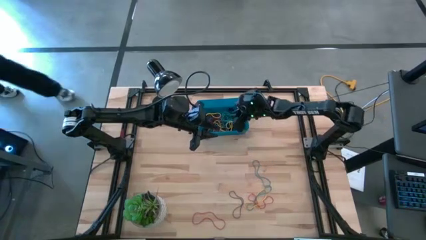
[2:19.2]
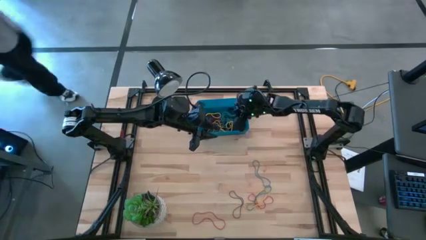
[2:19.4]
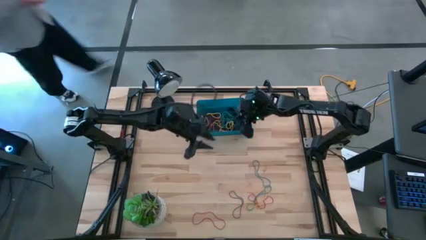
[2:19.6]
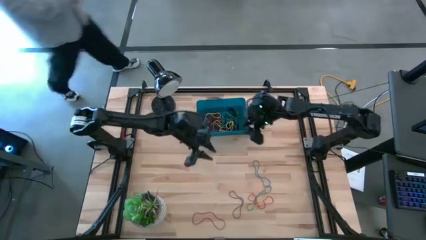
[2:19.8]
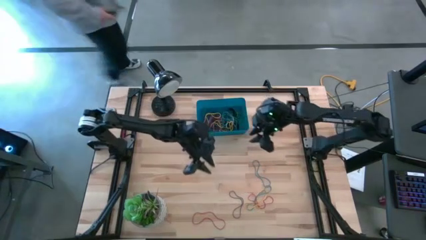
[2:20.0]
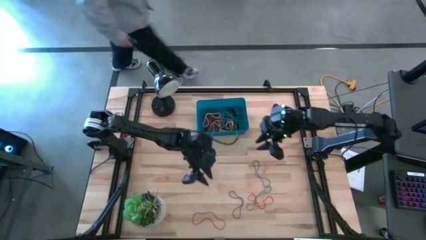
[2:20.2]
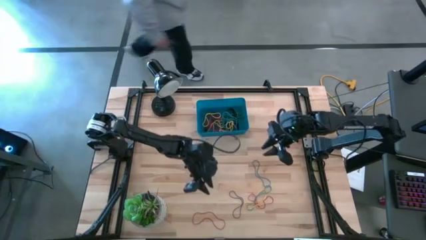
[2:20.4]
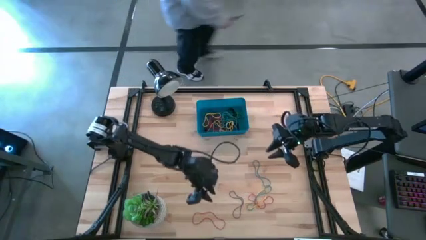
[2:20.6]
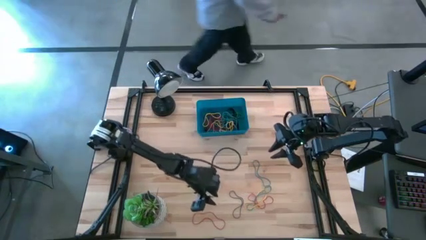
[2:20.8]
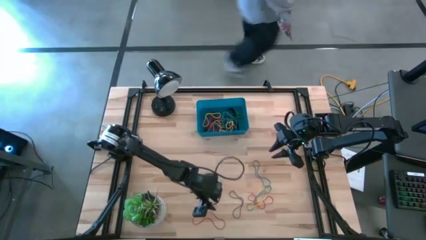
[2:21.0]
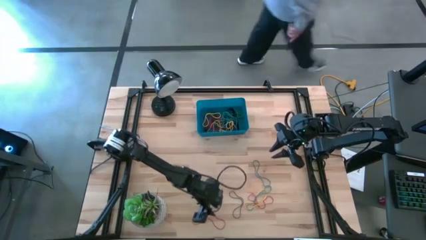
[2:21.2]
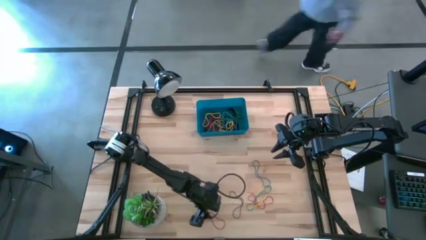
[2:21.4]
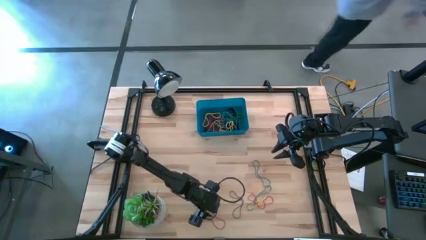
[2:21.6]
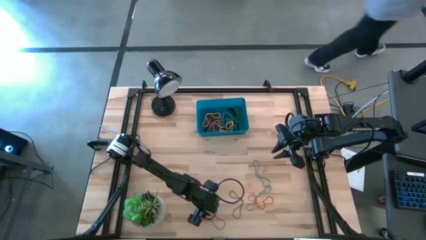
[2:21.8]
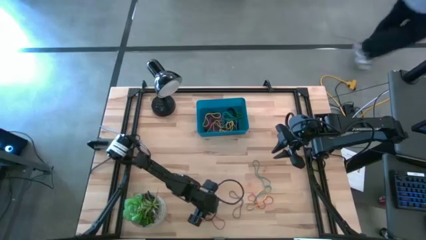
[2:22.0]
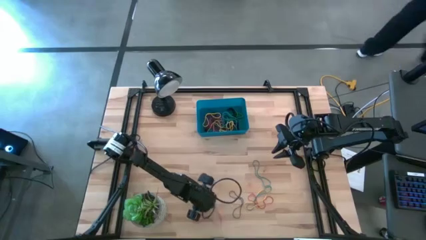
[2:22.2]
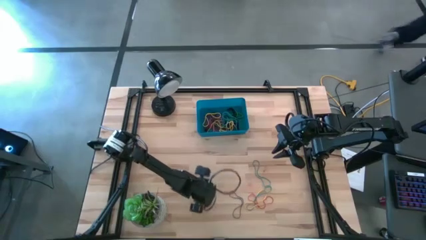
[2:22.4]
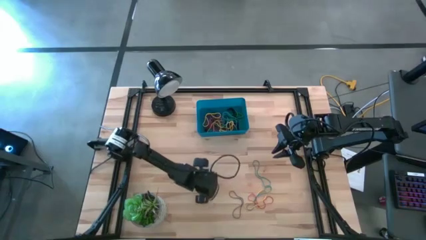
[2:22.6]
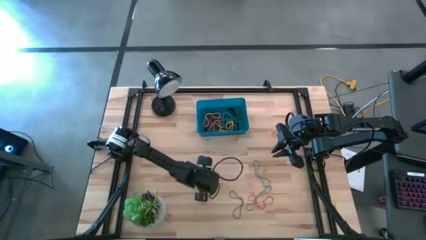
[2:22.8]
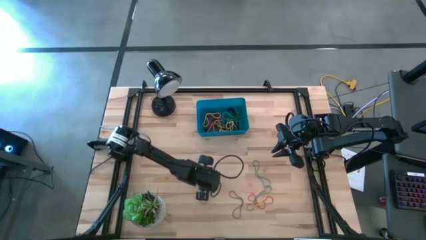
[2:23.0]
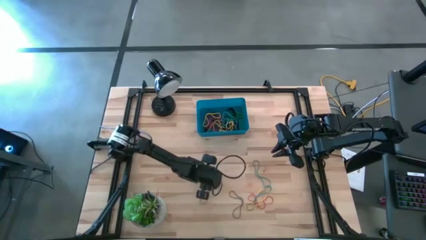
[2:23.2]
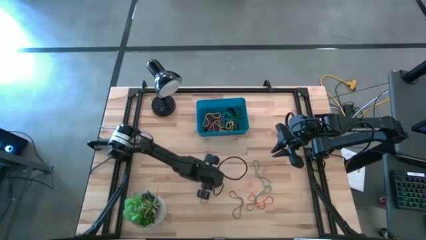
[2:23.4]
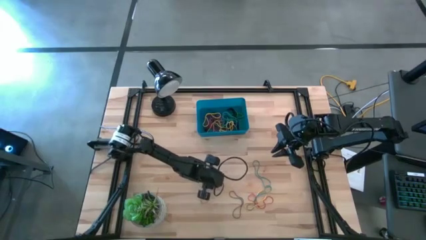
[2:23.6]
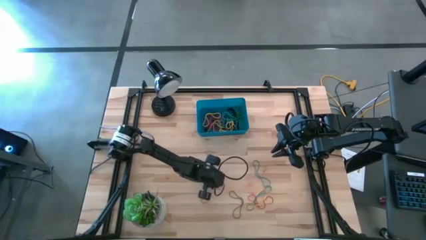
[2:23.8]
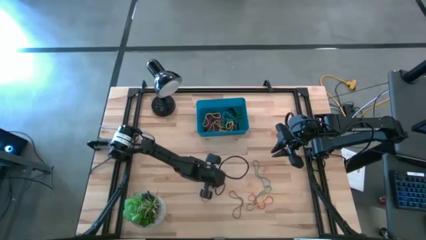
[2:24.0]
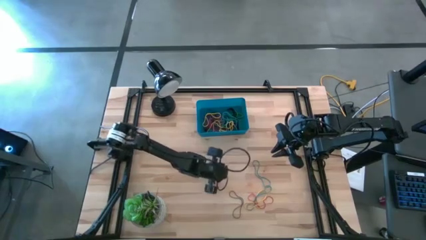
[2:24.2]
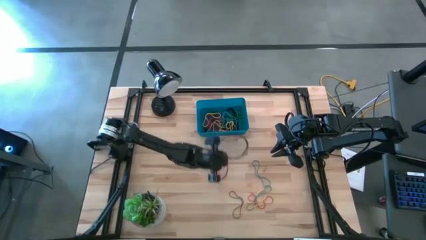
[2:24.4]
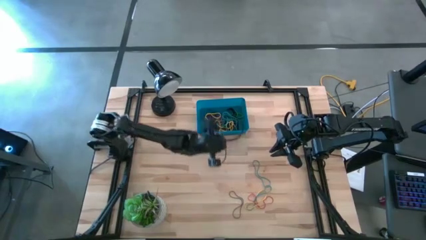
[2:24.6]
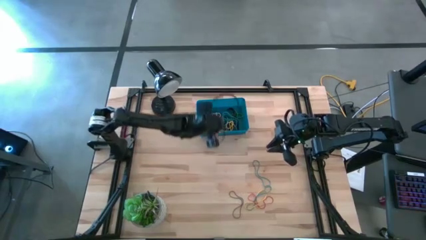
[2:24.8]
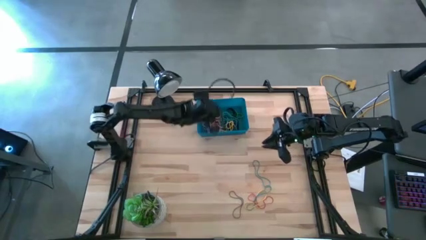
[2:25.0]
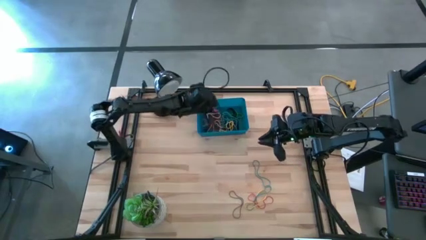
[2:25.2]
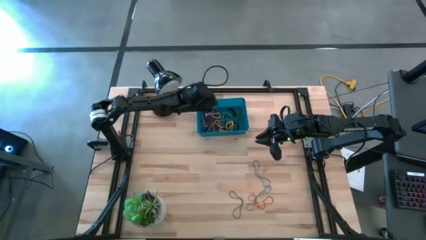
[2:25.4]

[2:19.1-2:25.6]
Task: Pick and place rubber bands into bin
Put the red rubber band into the blue bin

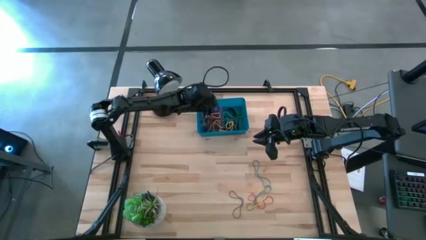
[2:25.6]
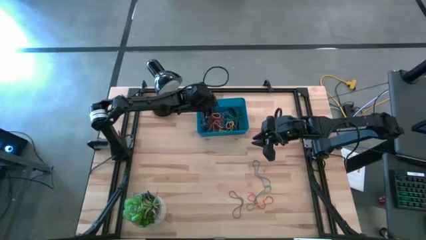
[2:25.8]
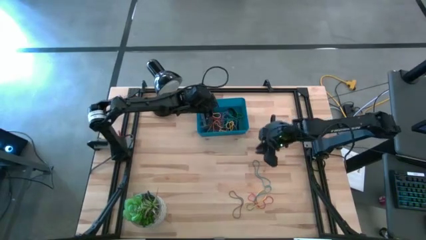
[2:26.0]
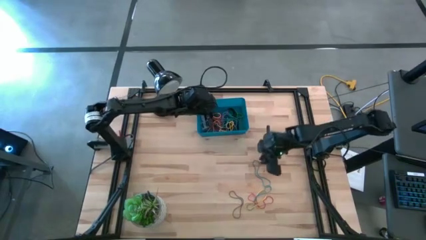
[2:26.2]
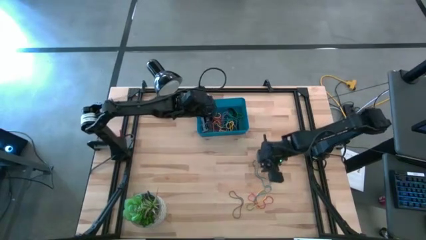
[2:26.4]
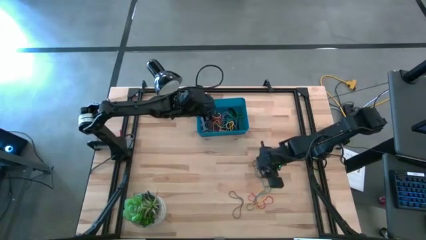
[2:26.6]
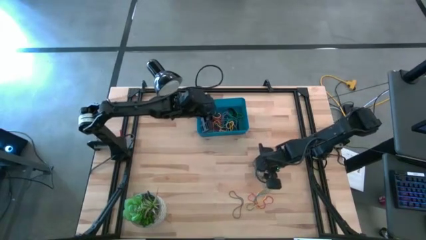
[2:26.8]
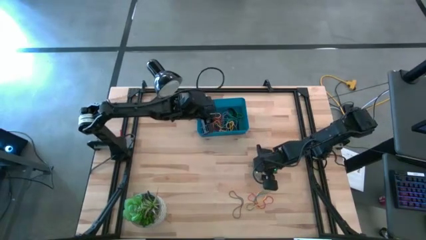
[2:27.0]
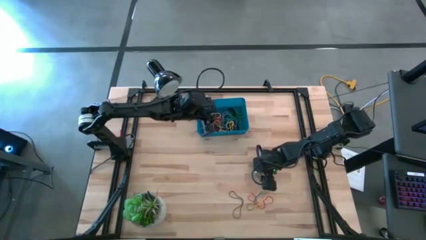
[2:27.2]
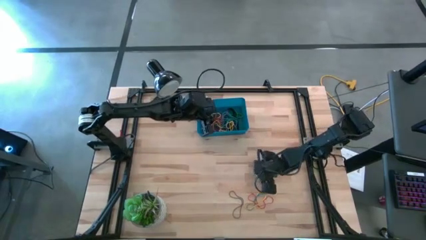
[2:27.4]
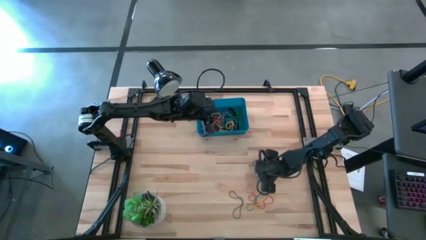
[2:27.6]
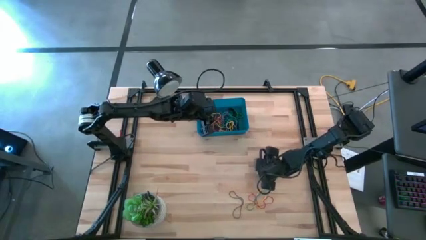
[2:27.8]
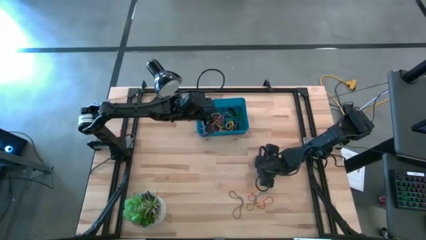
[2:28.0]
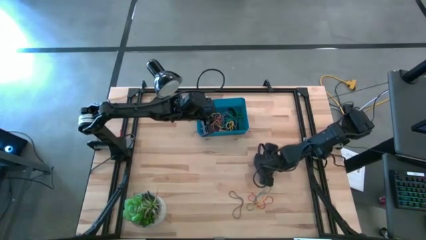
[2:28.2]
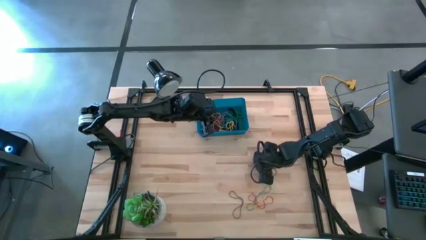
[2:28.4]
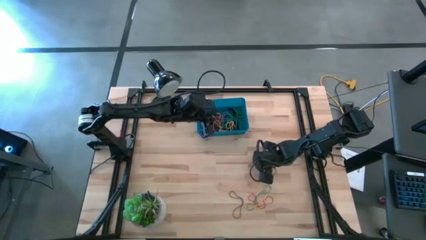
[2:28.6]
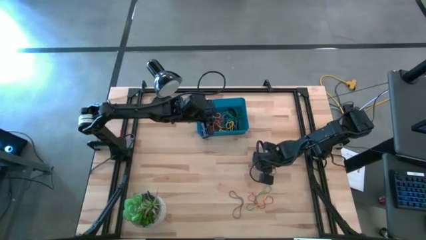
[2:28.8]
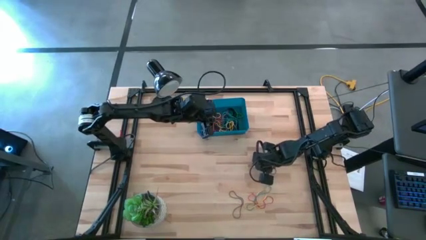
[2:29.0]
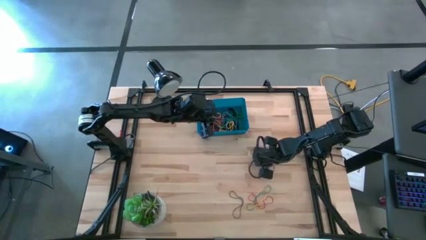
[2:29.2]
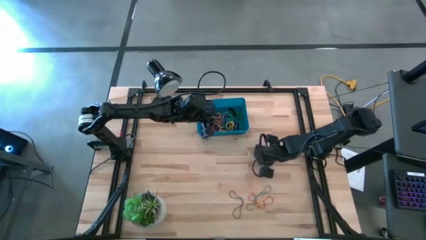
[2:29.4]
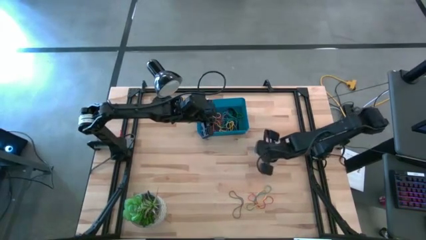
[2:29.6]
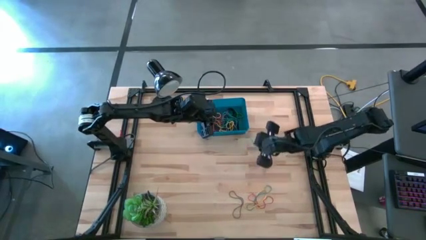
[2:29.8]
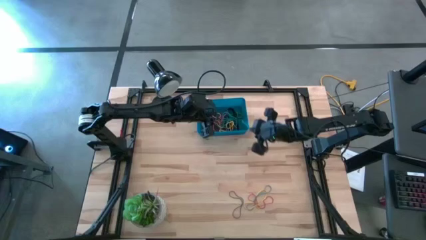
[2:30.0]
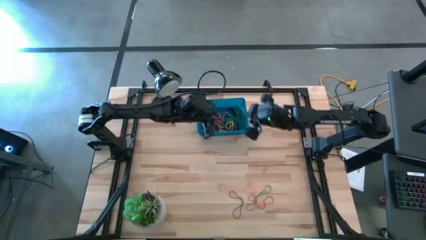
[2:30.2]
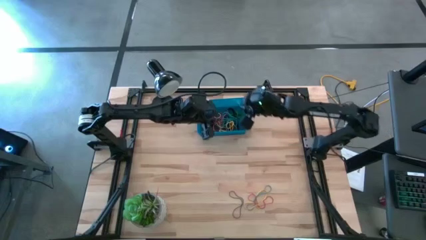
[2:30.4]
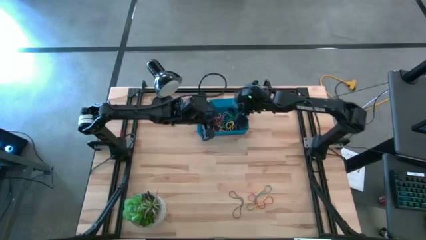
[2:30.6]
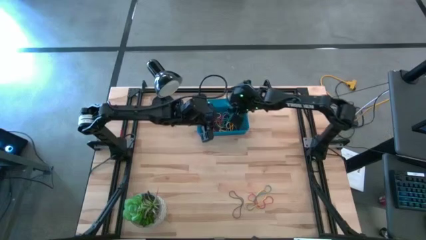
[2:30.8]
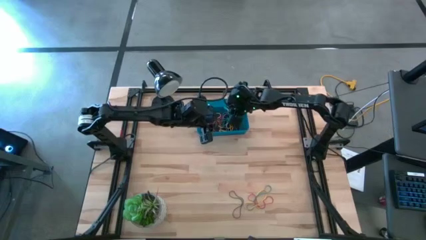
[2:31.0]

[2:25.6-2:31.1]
Put the blue rubber band into the blue bin

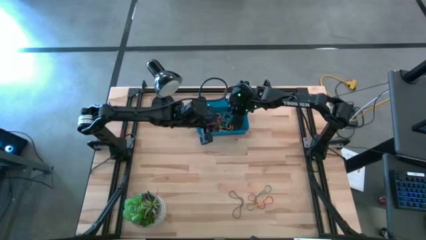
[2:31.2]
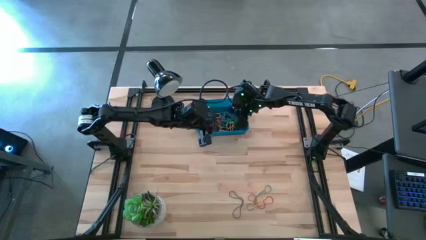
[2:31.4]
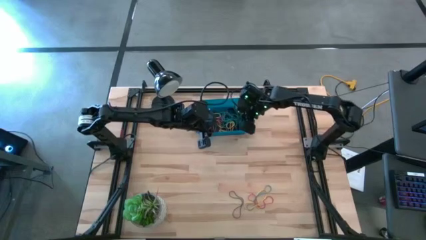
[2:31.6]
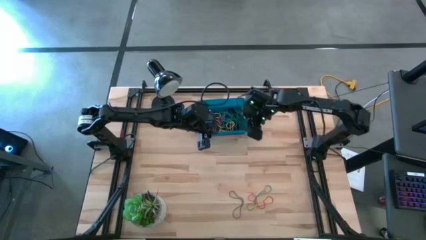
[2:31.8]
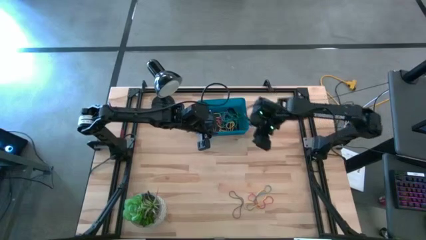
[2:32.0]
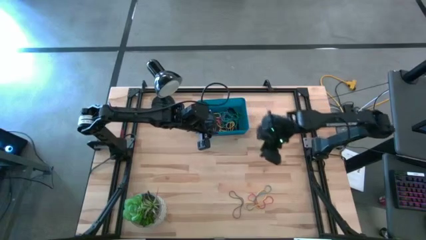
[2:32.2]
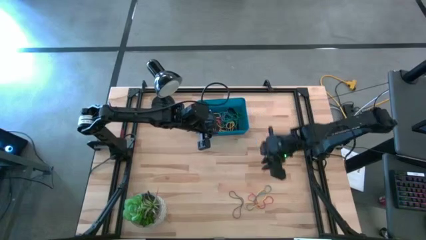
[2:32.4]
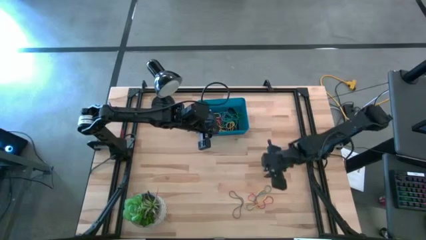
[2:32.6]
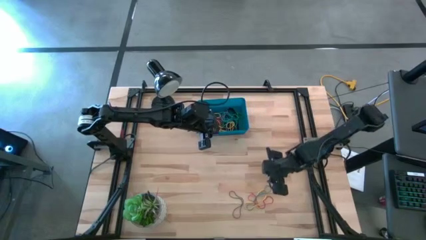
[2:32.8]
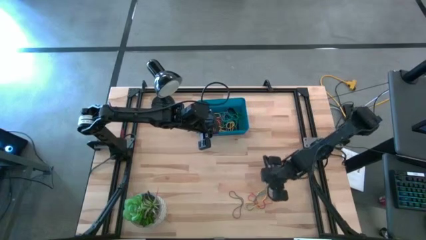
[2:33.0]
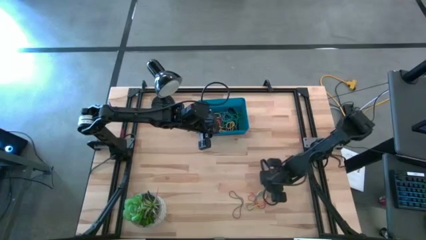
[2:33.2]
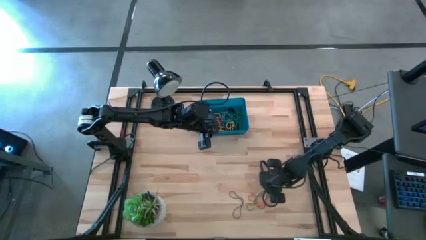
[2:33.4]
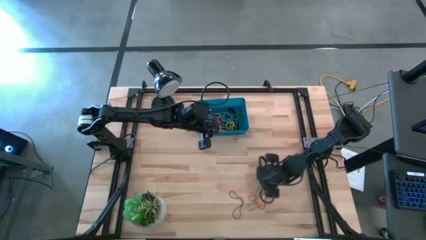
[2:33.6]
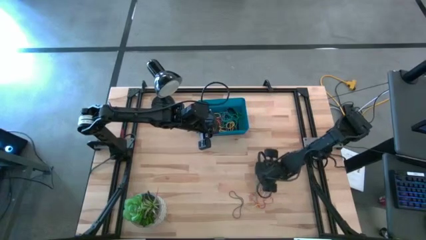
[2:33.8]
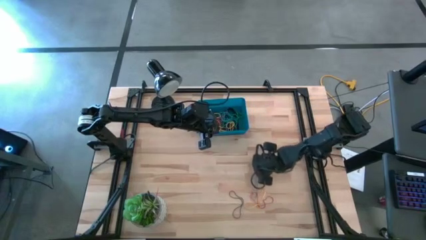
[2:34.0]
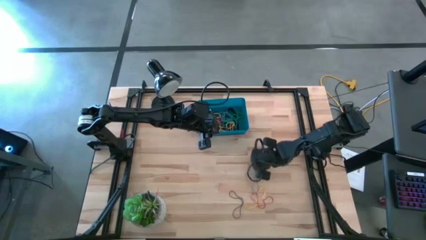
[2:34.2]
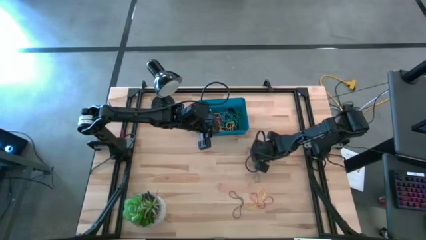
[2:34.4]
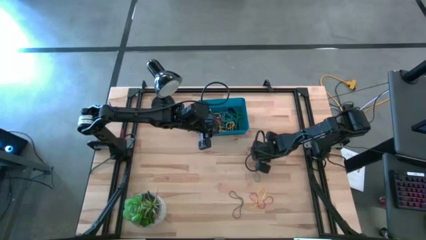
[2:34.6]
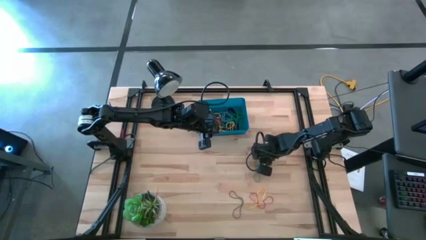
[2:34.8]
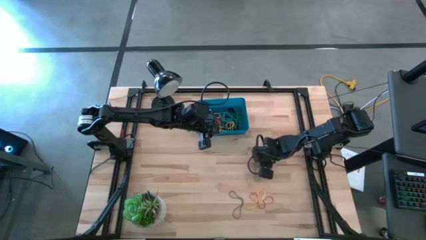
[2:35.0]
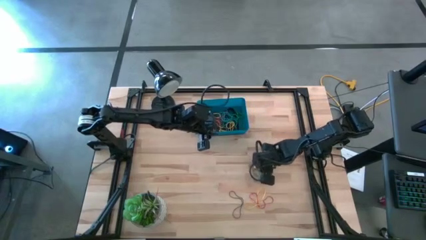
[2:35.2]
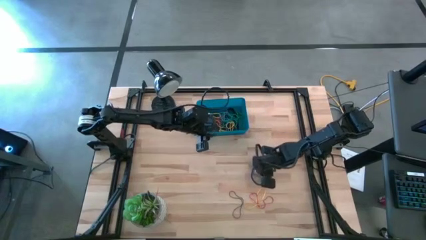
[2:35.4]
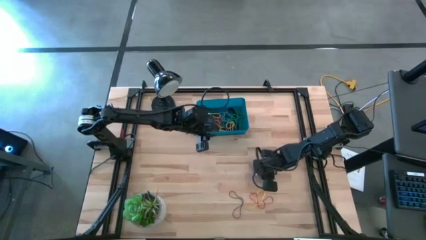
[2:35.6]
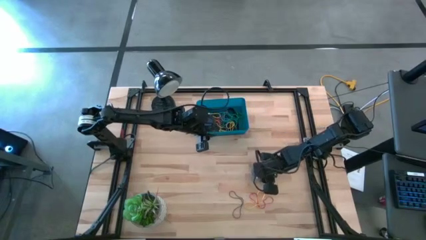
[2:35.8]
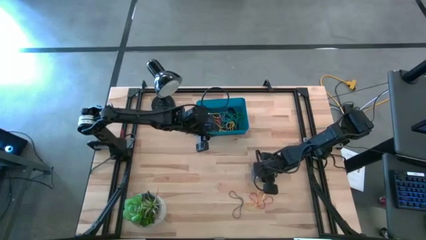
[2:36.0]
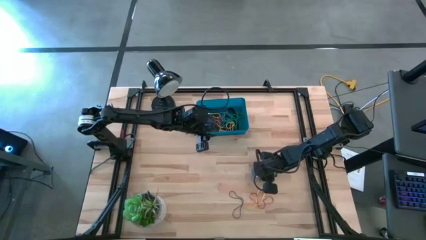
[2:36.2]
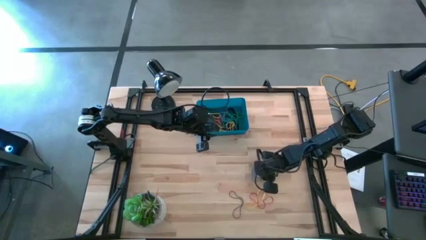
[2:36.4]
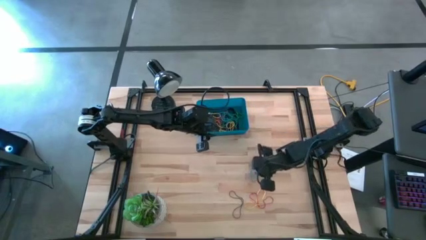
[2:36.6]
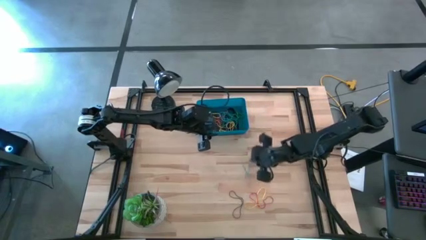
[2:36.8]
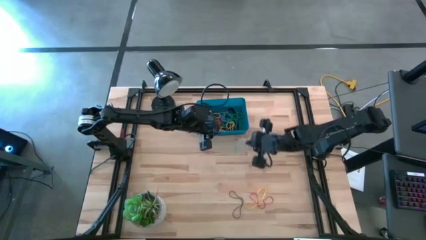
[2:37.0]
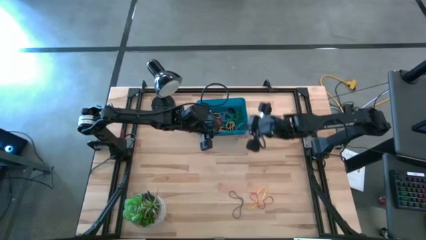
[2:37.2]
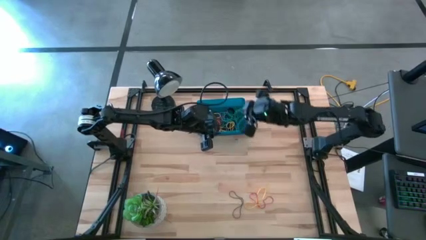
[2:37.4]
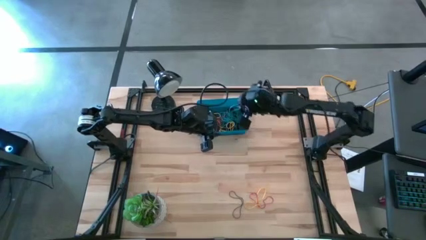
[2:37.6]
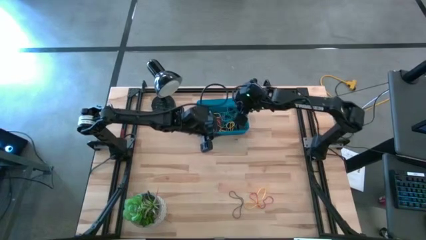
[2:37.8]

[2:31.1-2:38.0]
Put the blue rubber band into the blue bin
